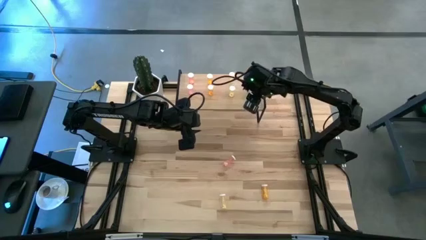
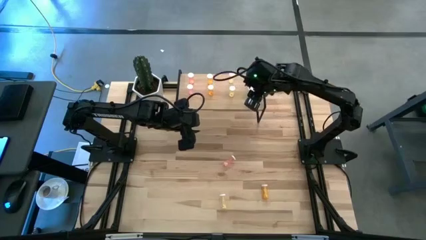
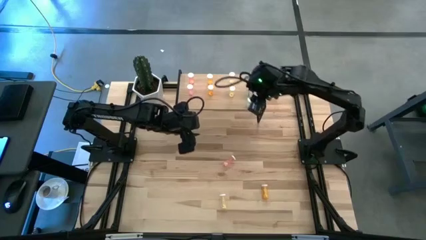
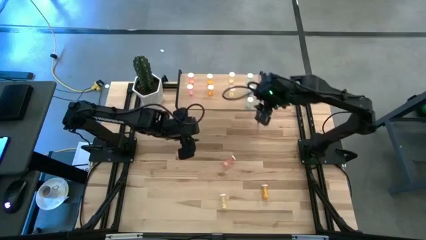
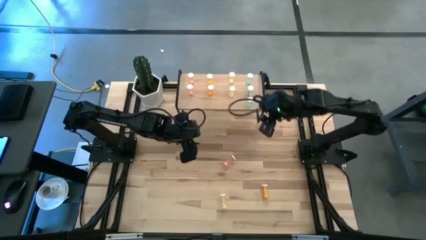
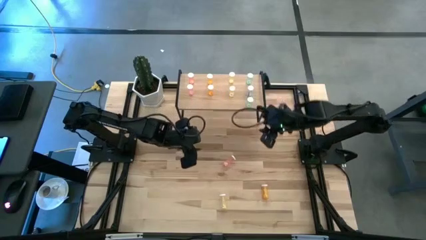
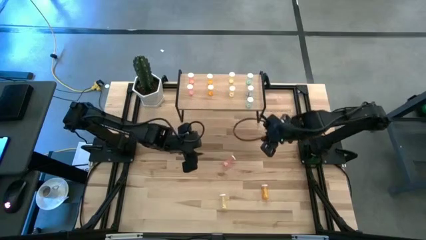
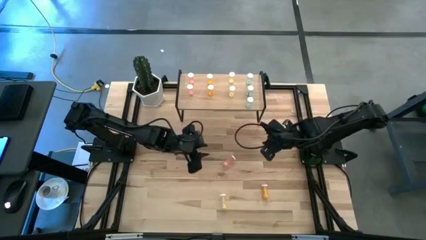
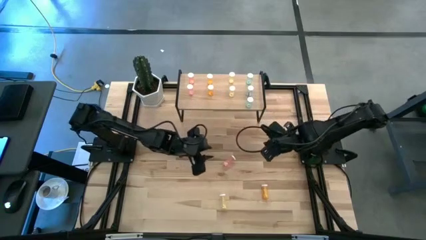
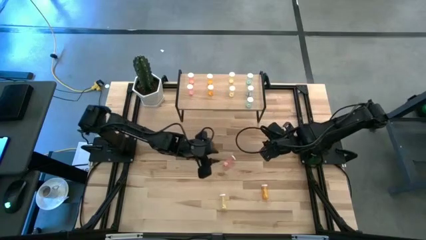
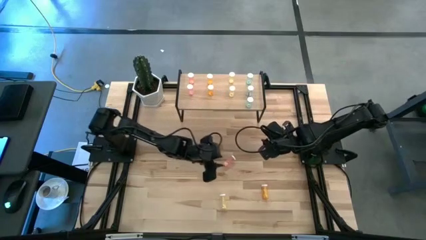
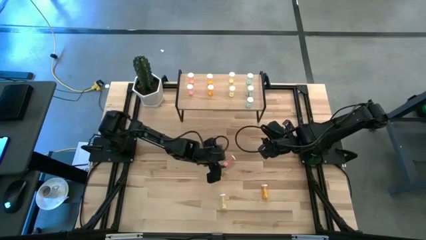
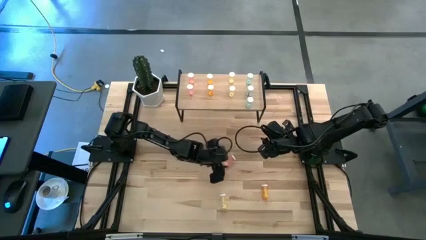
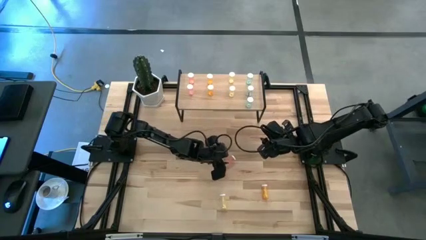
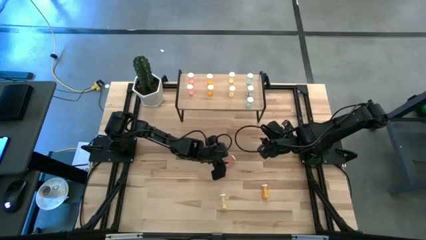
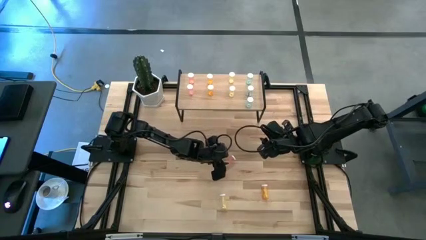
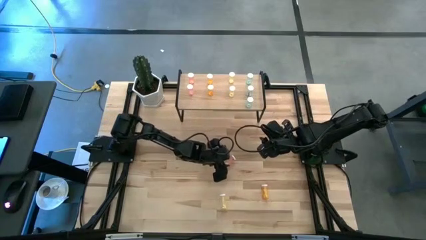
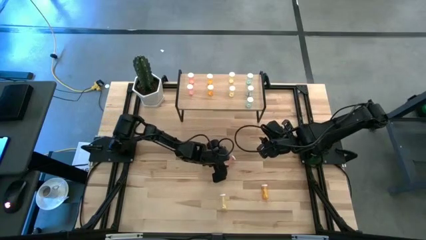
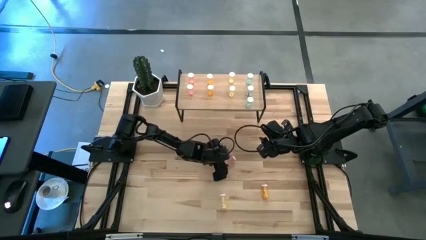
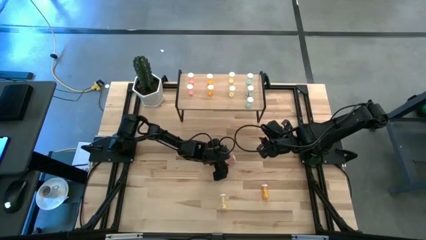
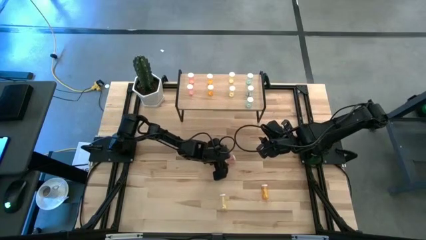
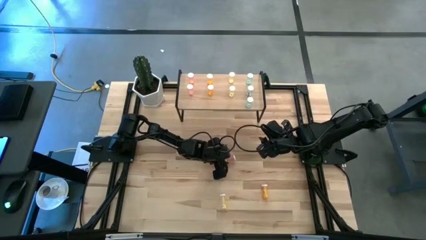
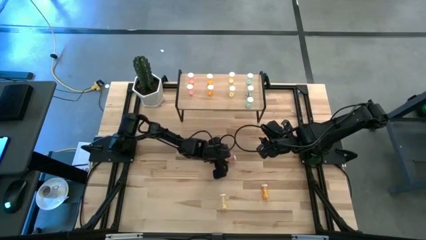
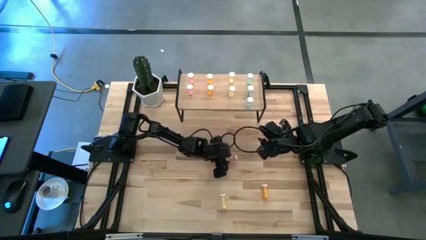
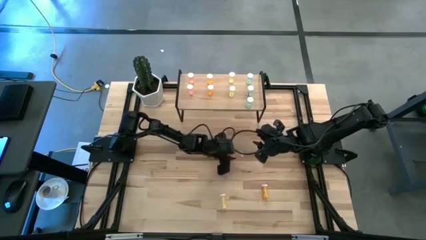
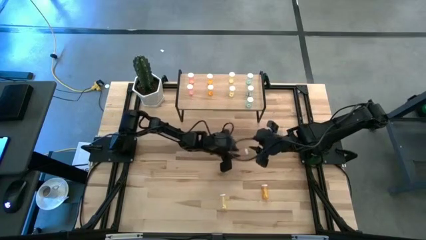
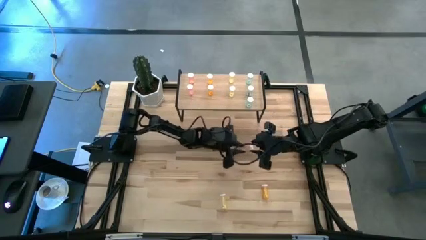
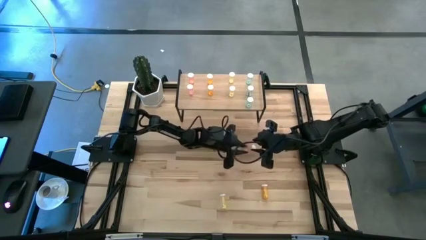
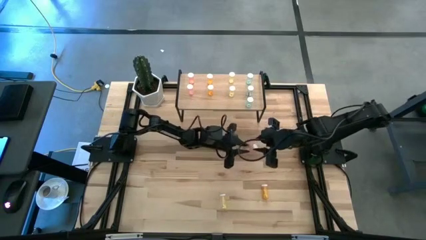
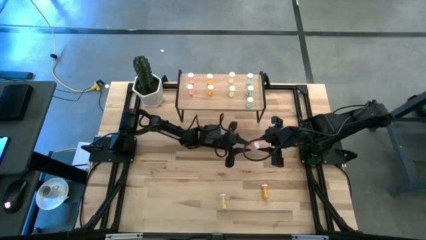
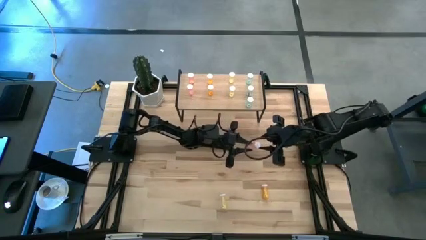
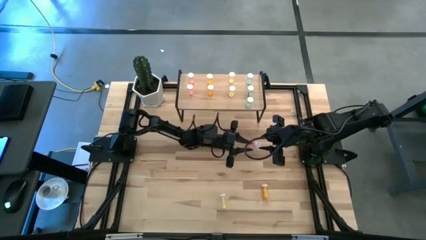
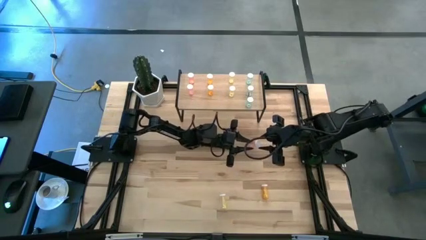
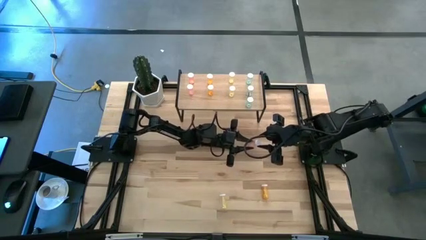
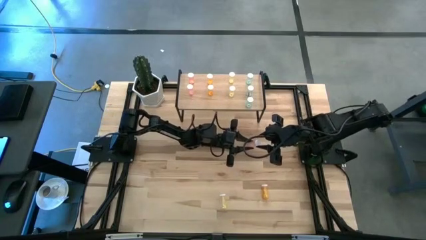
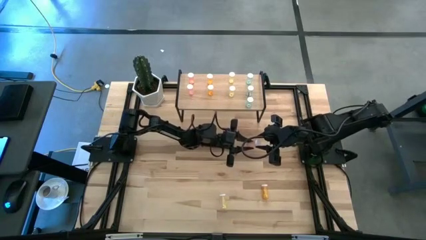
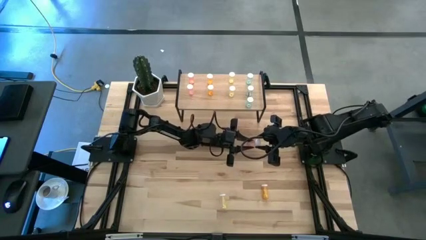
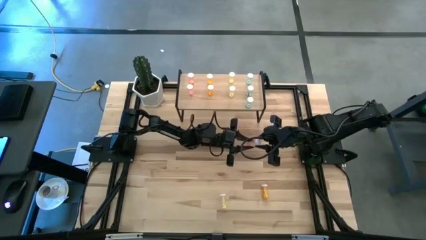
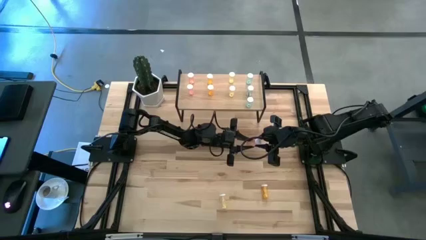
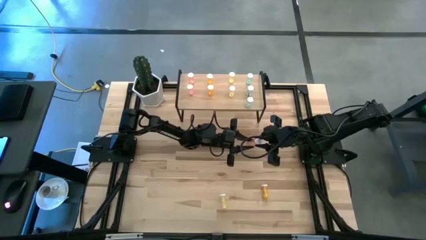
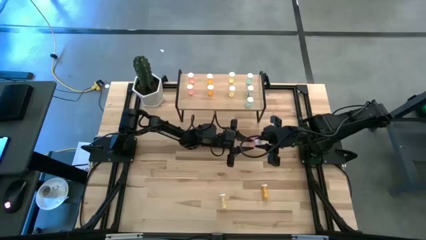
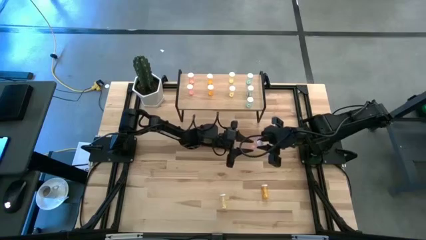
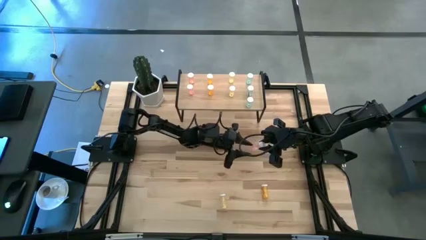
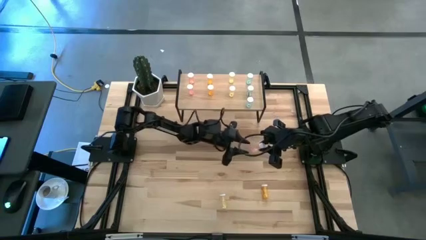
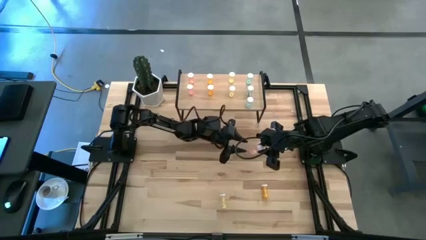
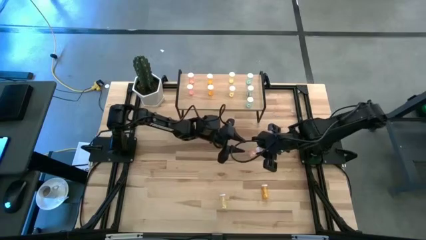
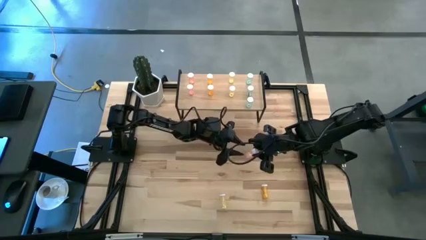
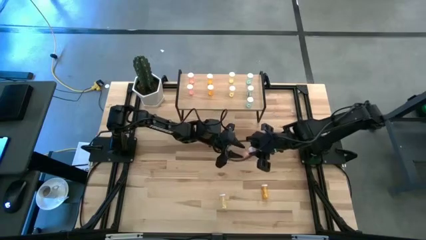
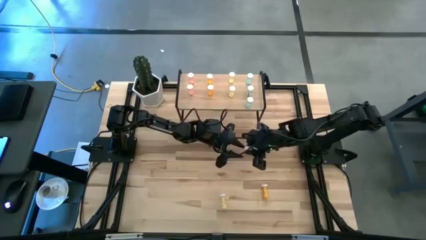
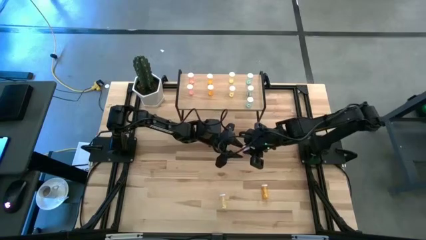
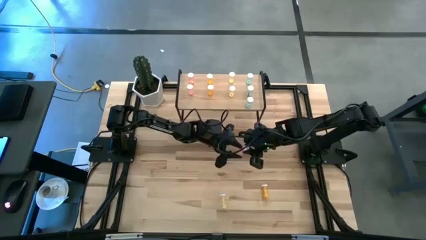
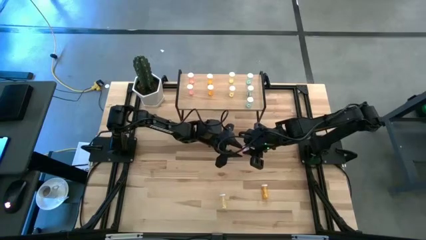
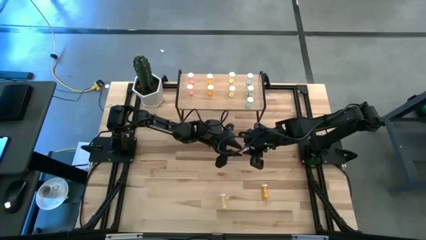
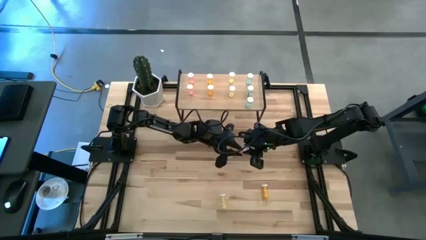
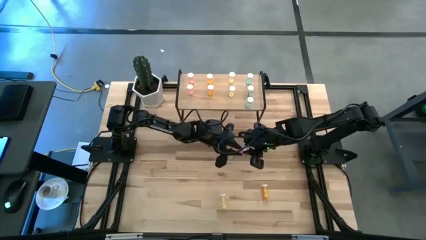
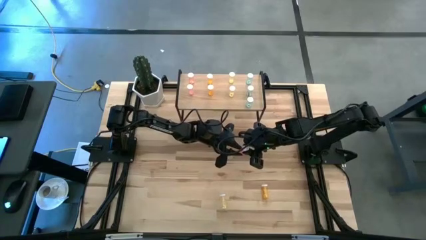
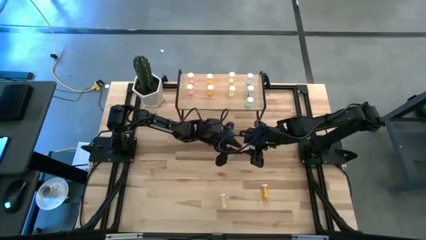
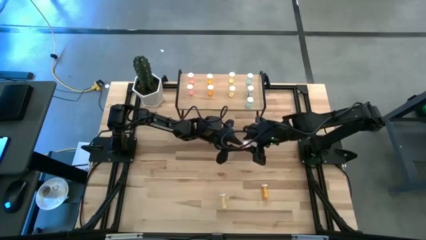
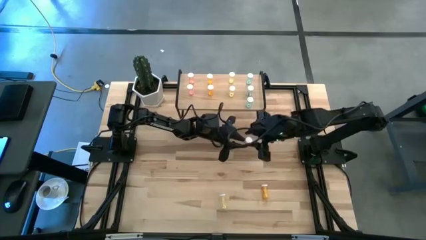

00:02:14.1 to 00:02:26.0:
Task: Pick and place medicine bottles onto shelf by color
Put the pink pill bottle aligned with other pink pill bottles on the shelf

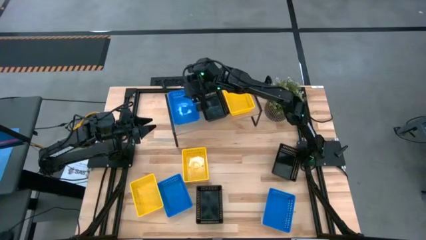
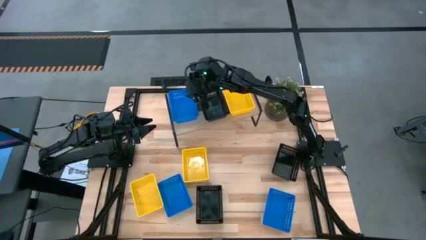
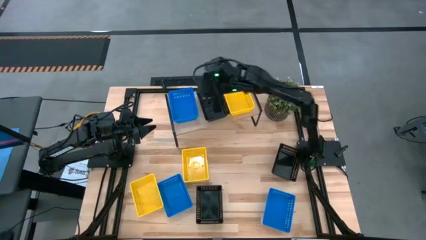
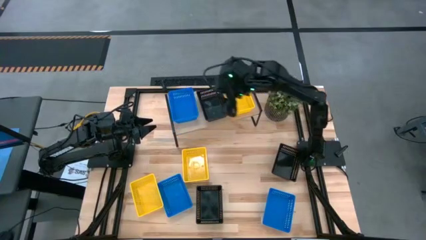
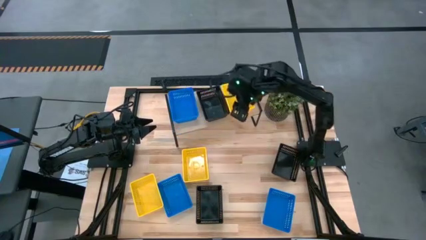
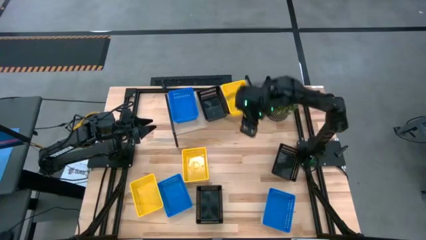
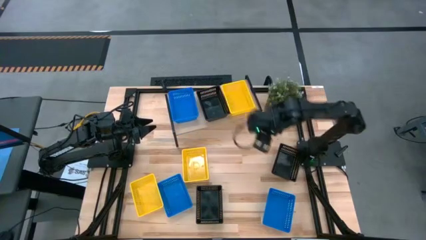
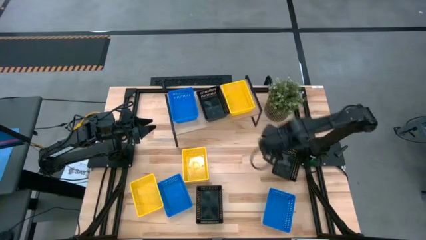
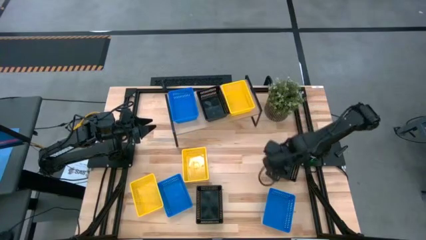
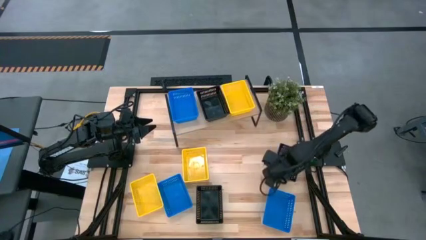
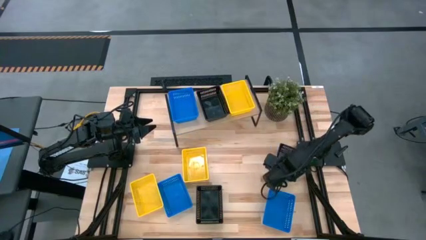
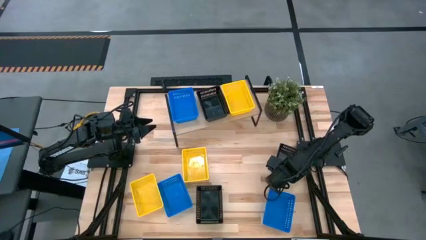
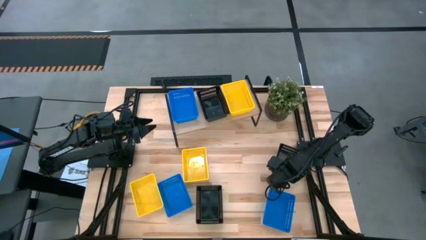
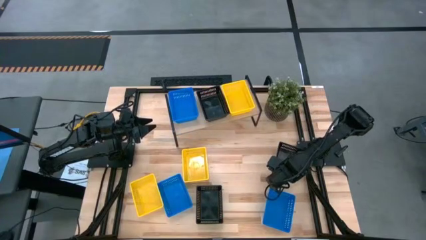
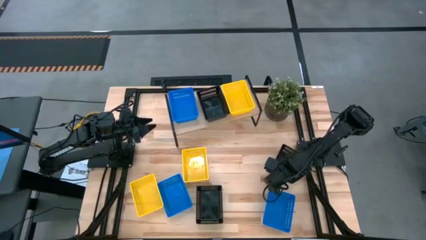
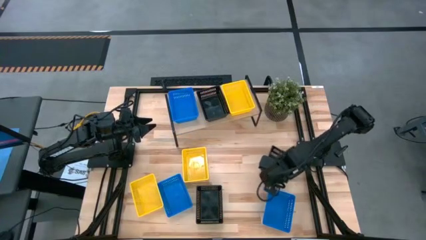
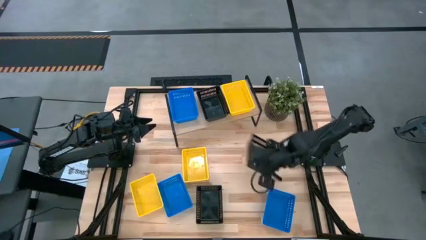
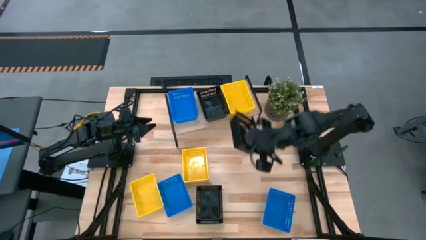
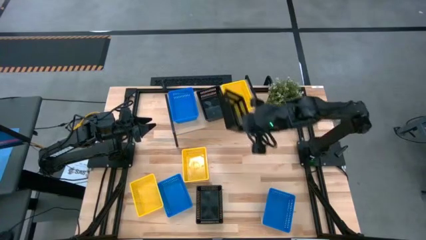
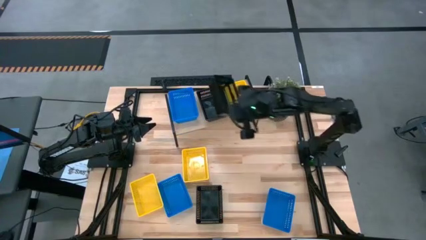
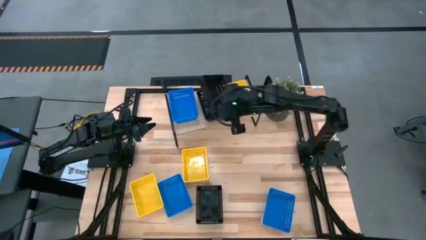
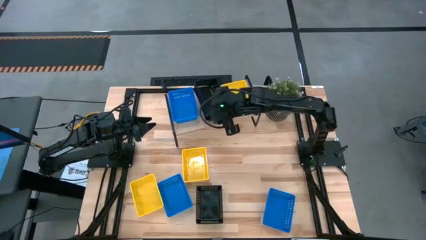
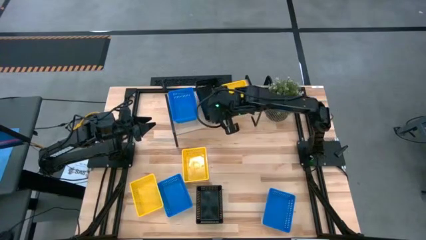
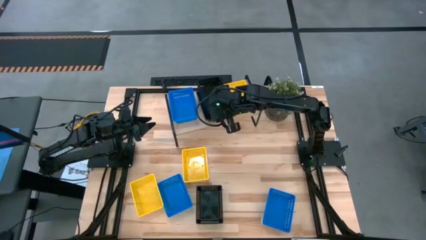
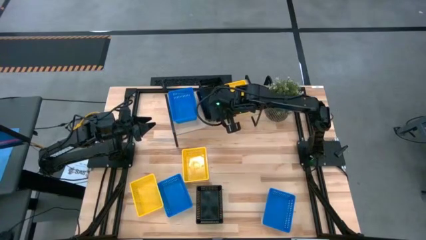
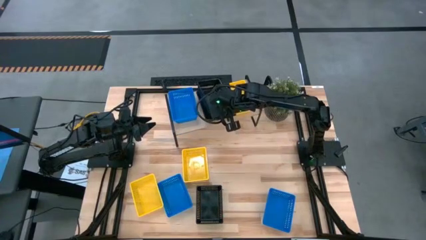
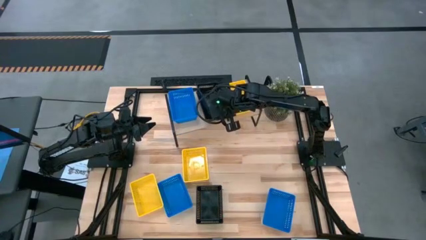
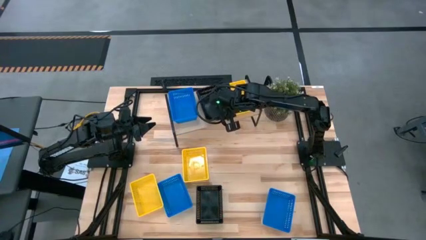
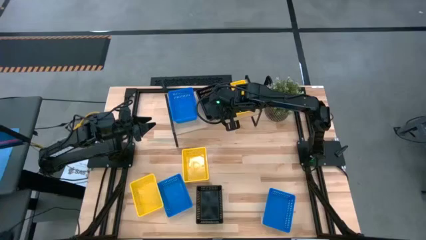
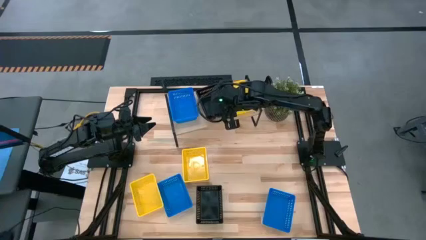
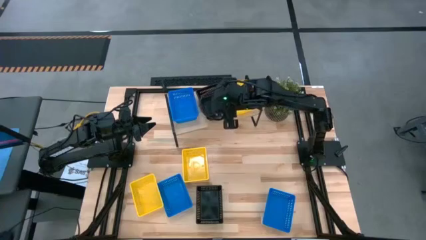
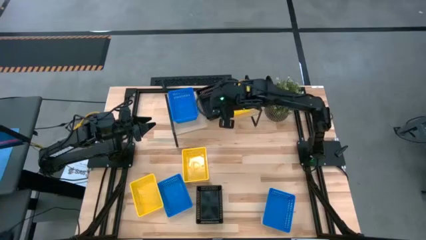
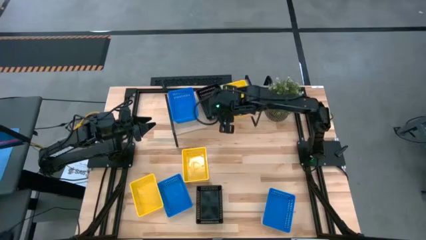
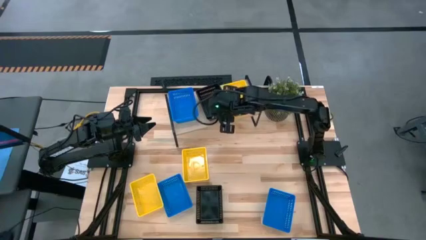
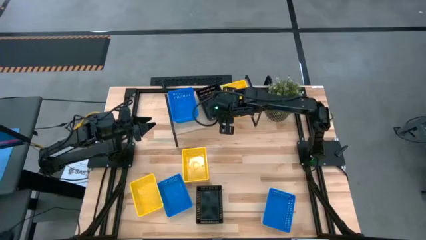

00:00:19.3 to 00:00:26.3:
Task: Stack baskets on shelf by color
Stack the top black bin on the black bin on the shelf
